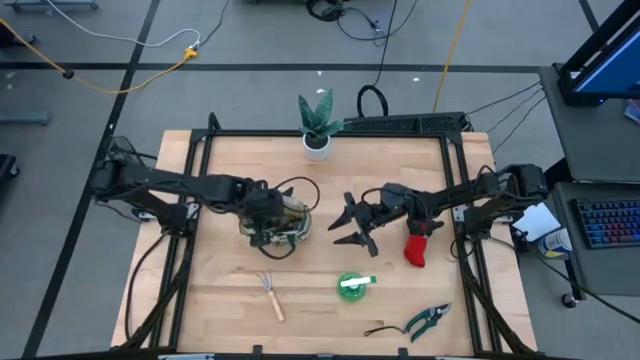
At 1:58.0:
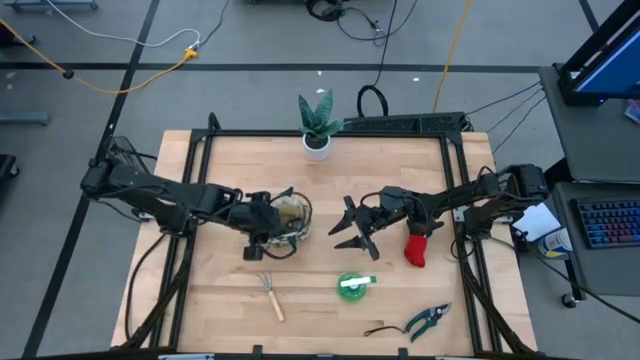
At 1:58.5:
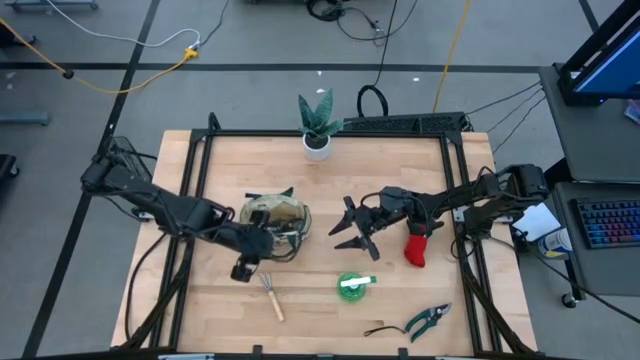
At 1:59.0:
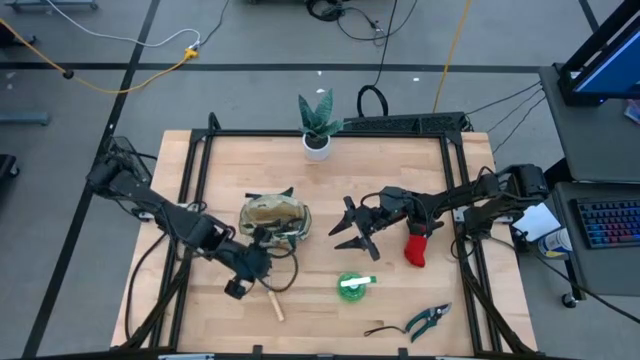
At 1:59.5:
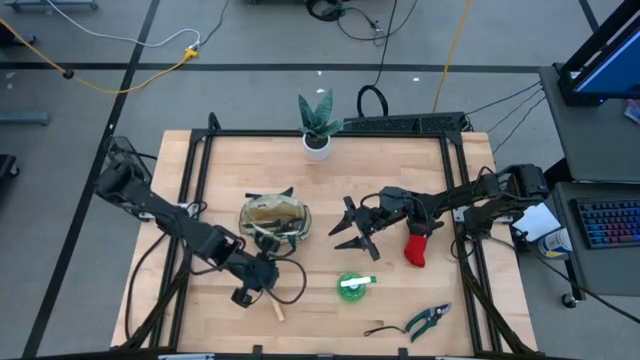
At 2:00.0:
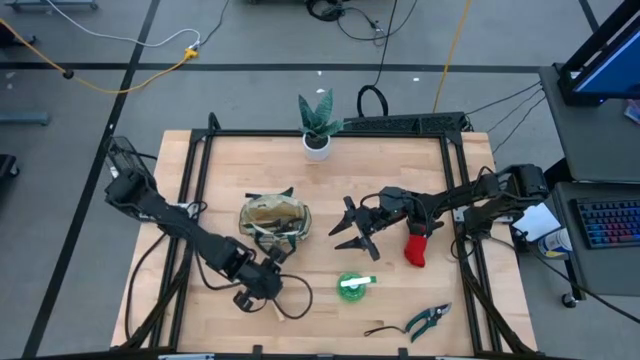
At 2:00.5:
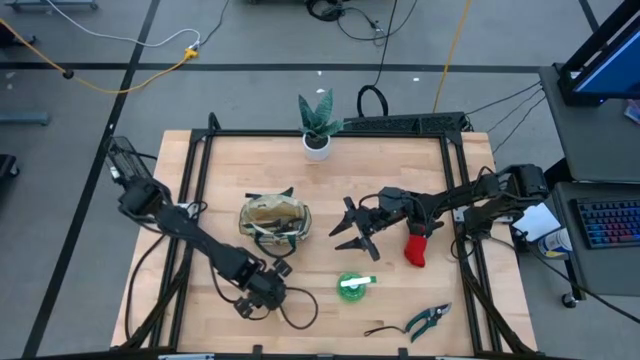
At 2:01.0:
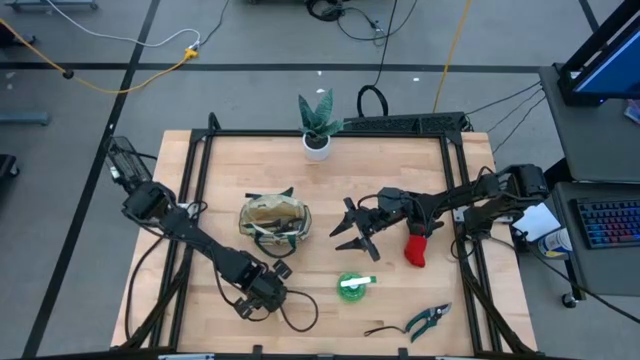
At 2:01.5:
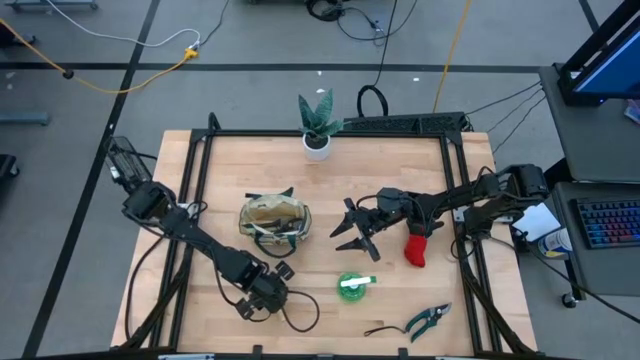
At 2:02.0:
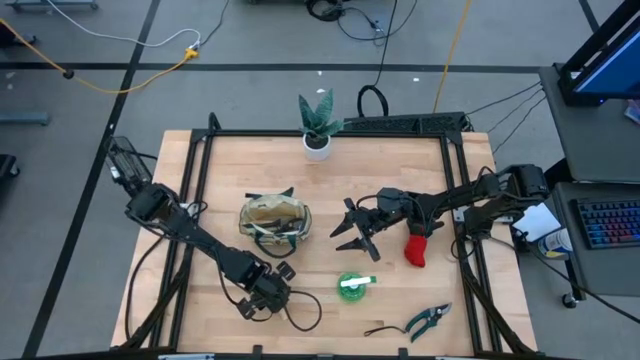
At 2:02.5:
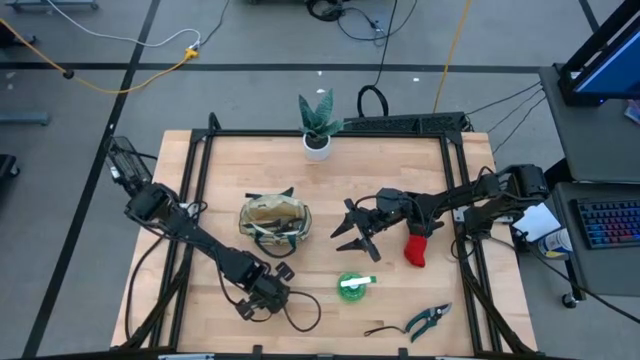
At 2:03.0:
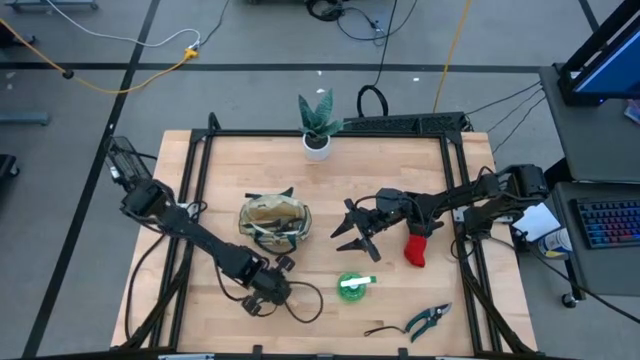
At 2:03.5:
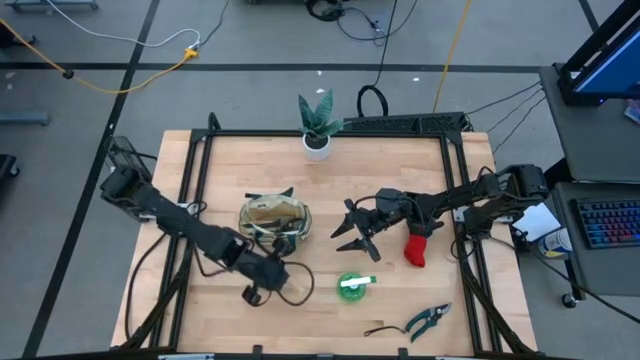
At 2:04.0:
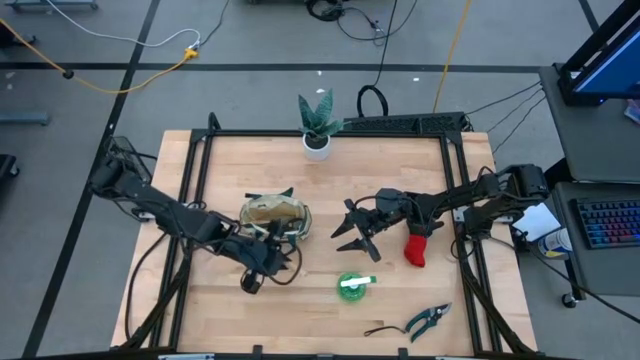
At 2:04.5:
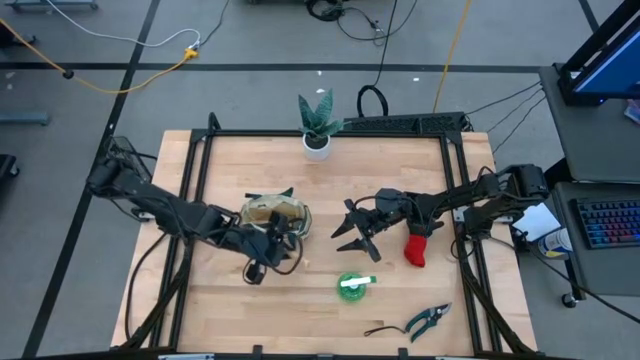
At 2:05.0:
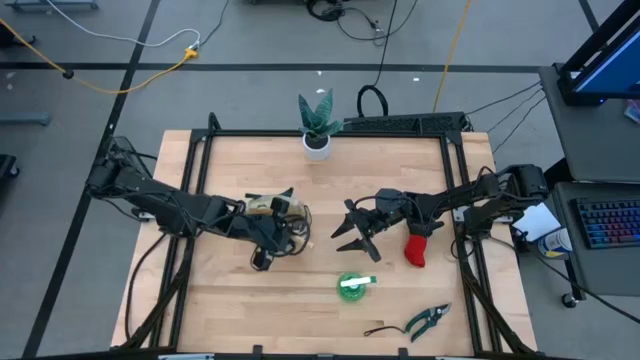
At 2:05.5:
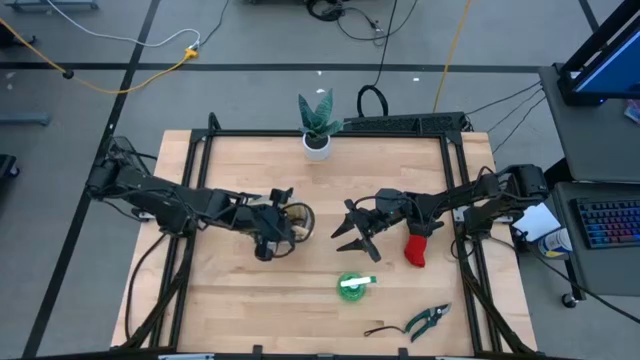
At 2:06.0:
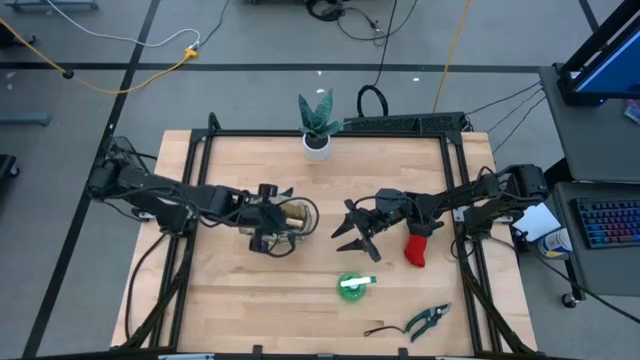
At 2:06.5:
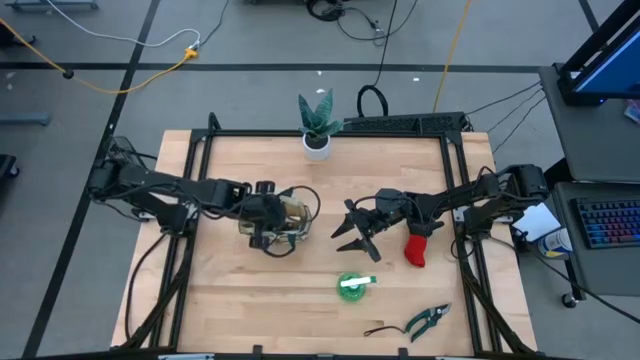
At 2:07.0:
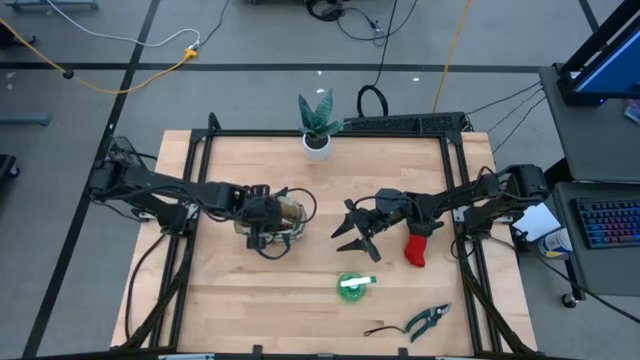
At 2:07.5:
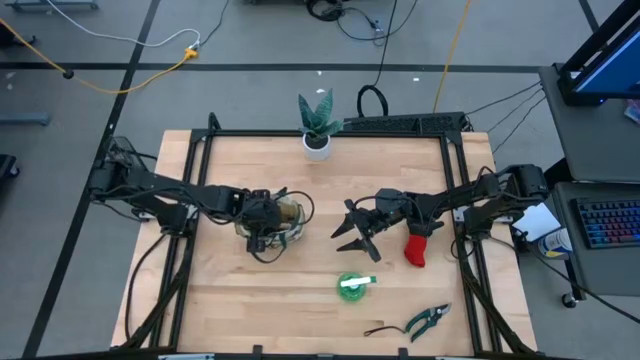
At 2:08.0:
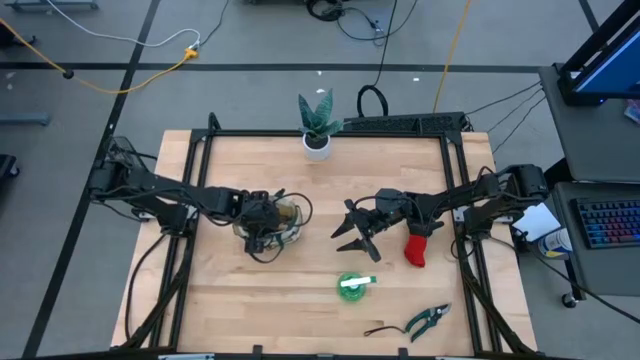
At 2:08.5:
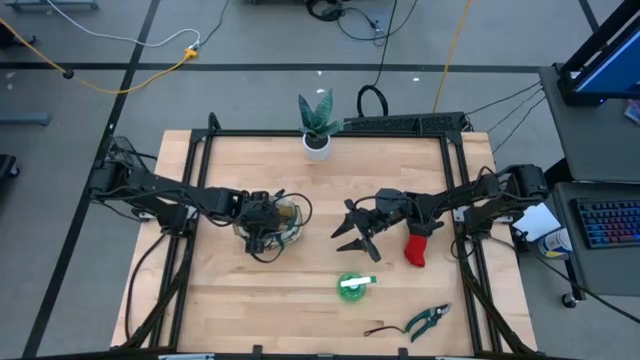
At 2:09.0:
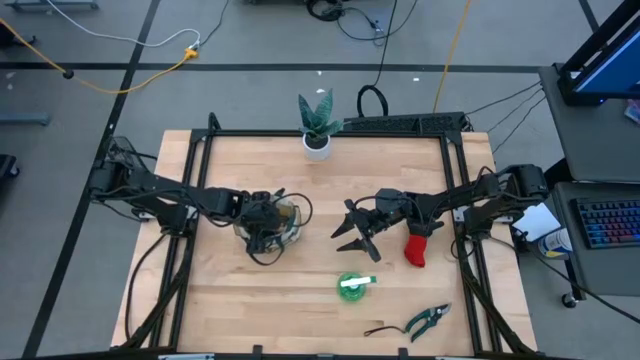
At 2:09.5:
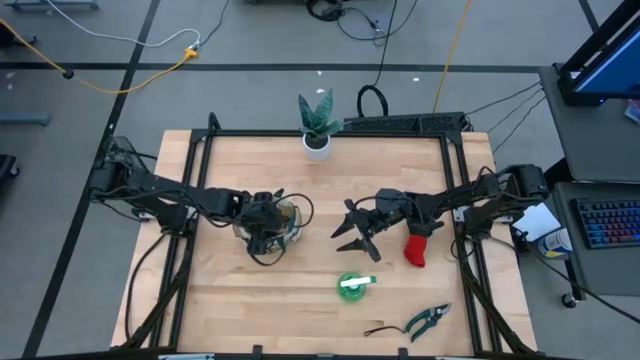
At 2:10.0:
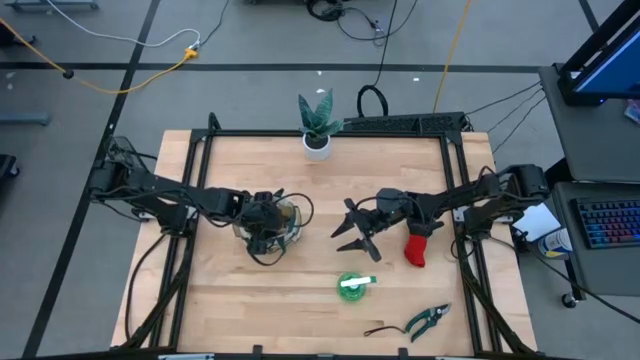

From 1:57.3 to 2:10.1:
Task: Pick & Place Garden tools in Gardening bag
Put the brown hand rake into the white gardening bag

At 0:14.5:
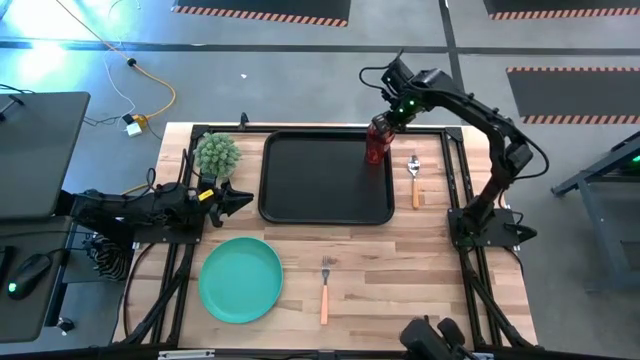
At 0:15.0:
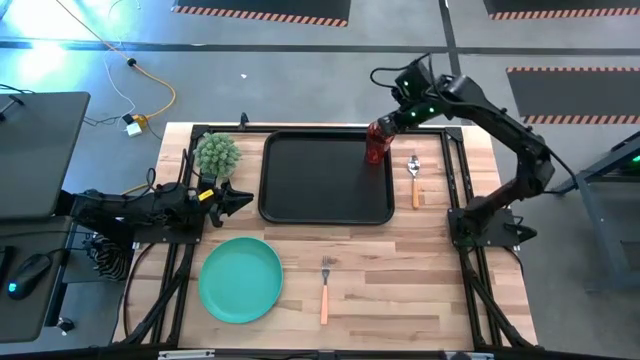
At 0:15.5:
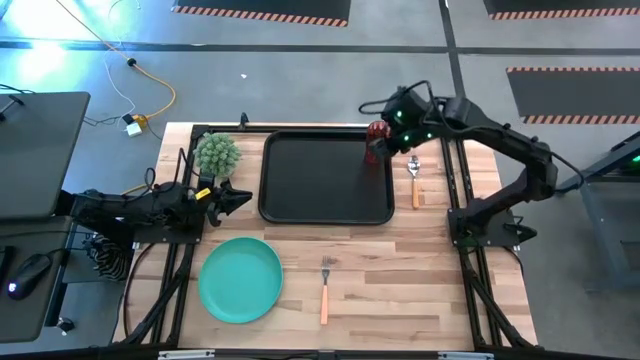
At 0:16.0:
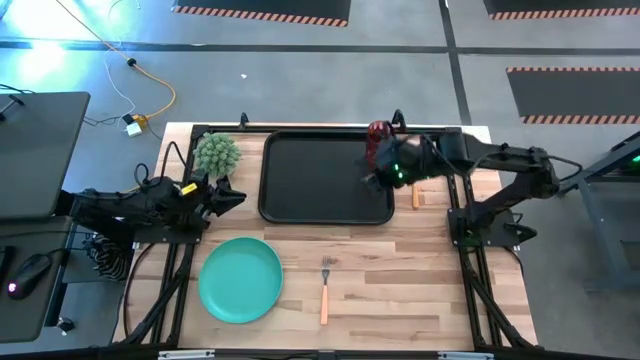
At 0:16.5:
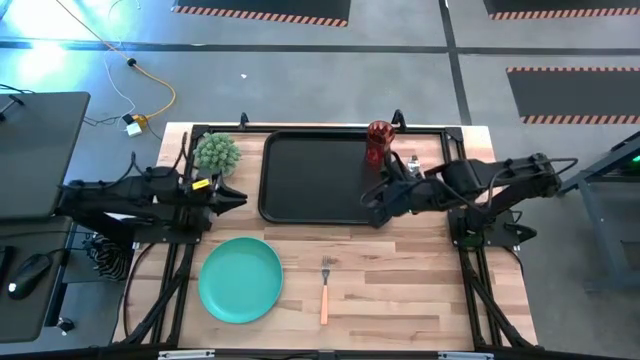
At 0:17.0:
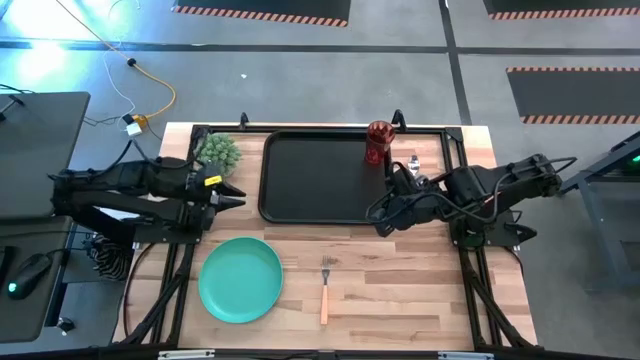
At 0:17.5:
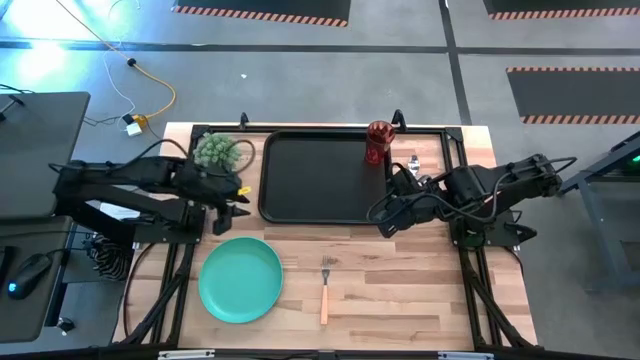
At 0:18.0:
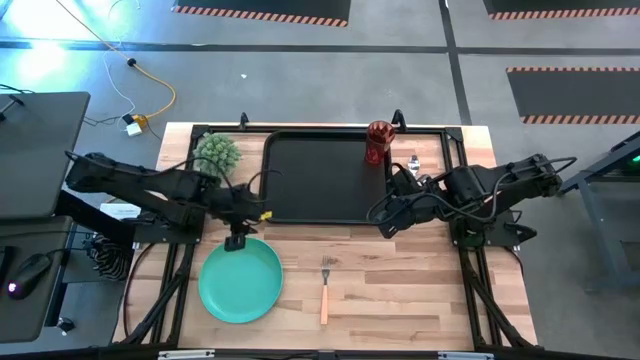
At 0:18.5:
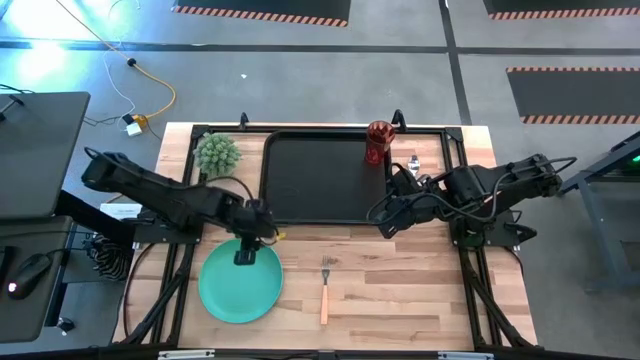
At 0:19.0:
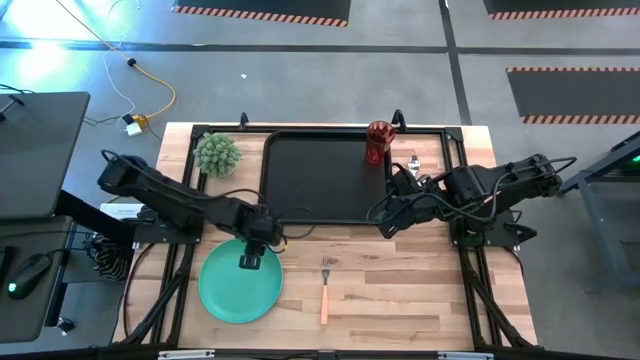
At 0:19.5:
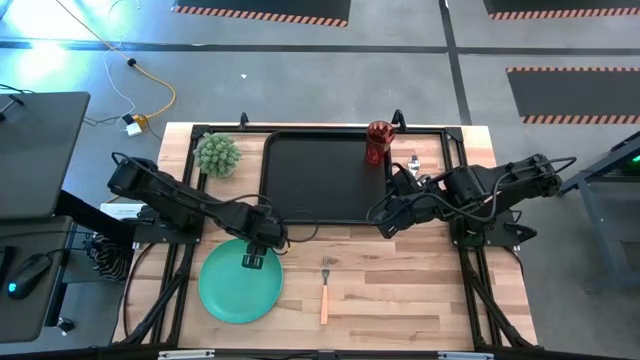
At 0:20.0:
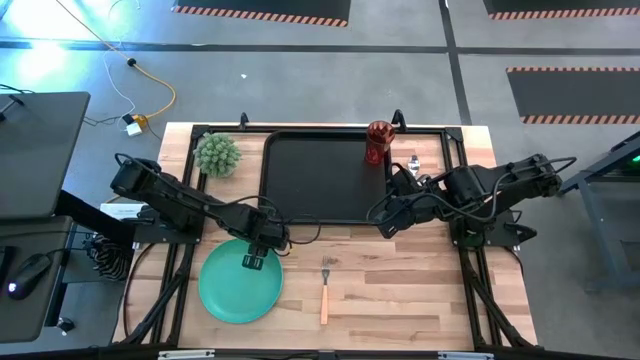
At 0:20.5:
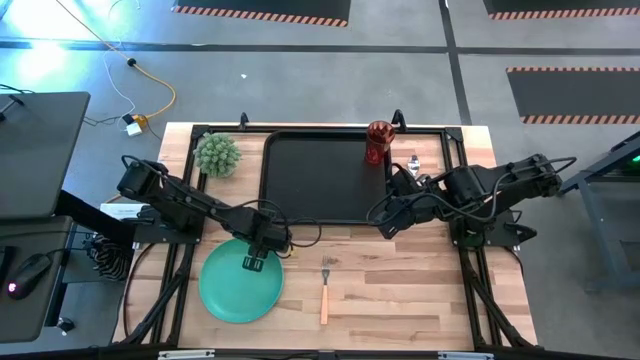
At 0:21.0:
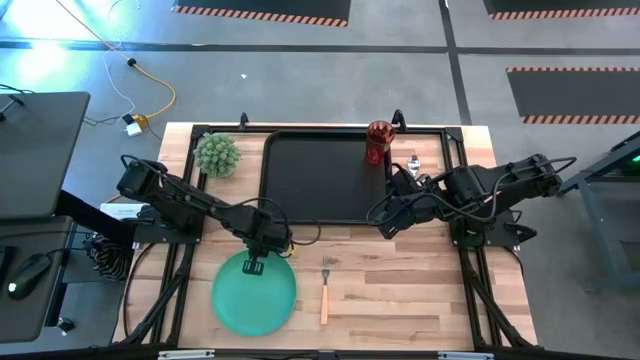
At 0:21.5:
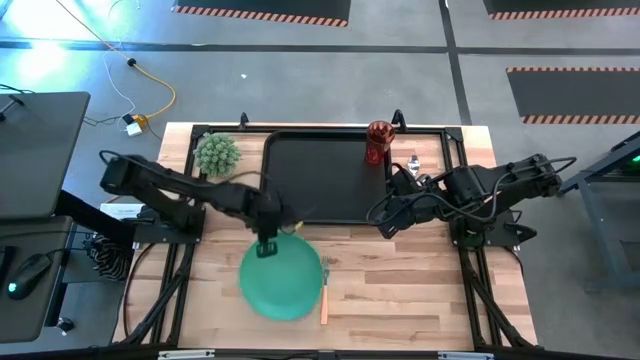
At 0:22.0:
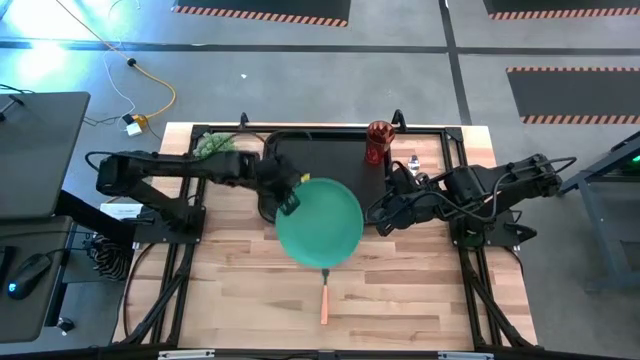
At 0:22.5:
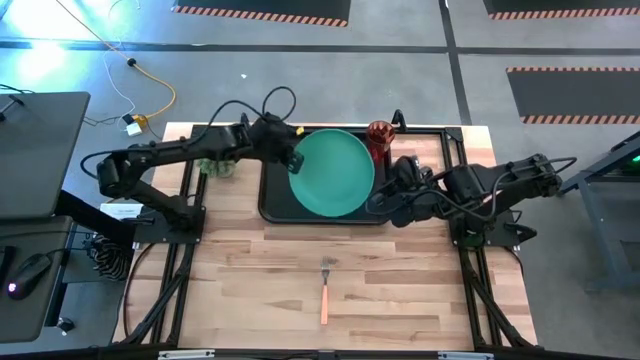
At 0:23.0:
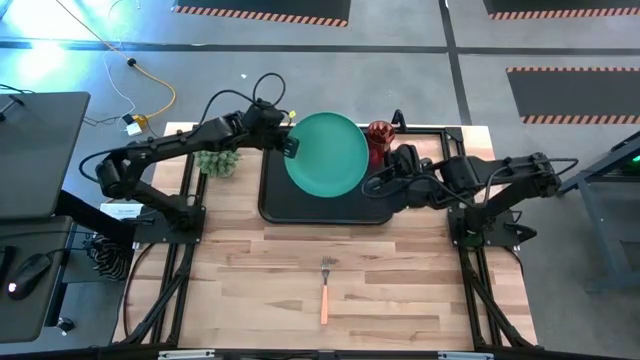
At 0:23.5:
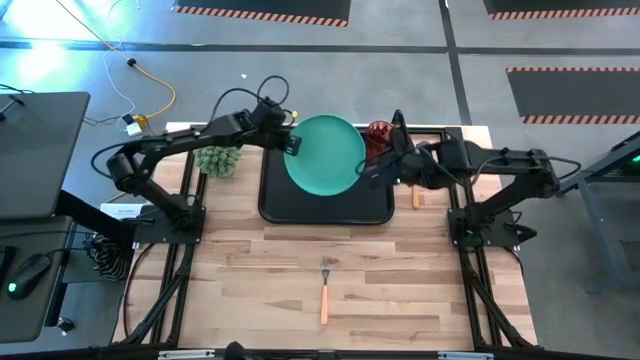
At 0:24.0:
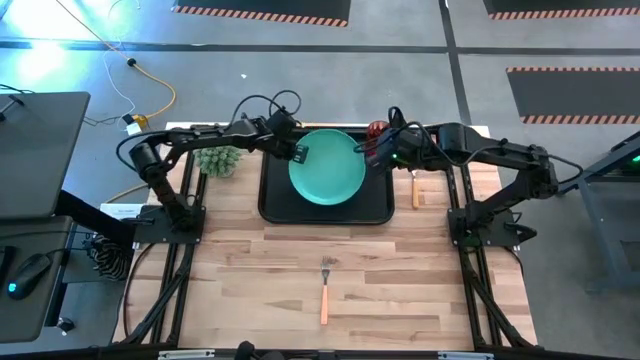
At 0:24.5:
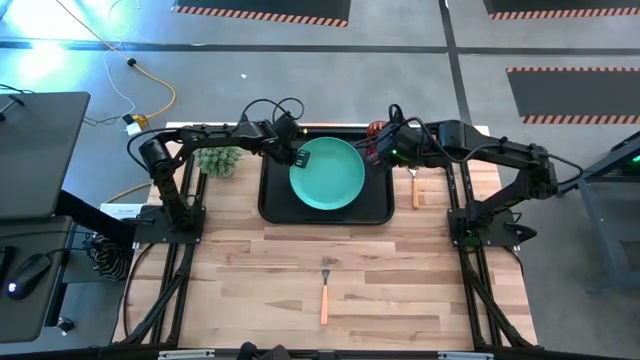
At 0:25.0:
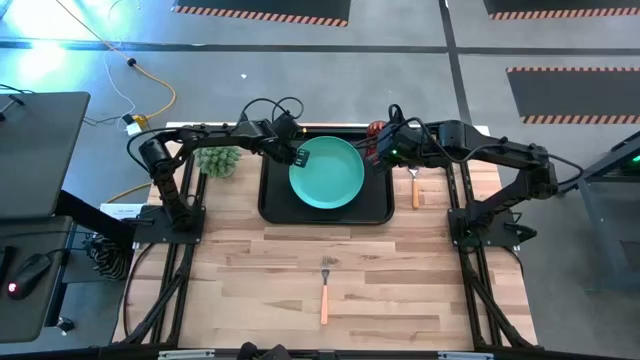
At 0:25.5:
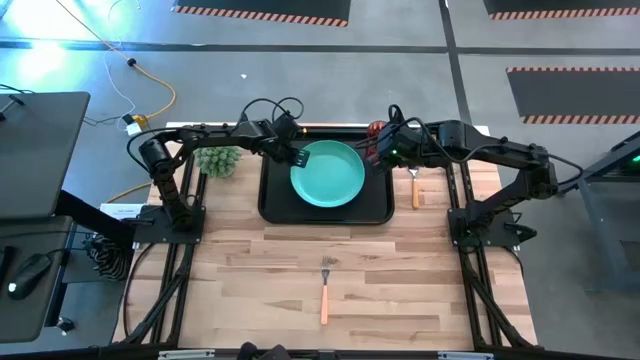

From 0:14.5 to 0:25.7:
Task: Pick and place plate/cup/fork/spoon on tray
Put the blue plate on the black tray to the bottom left of the red cup
